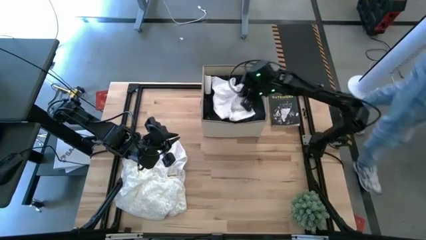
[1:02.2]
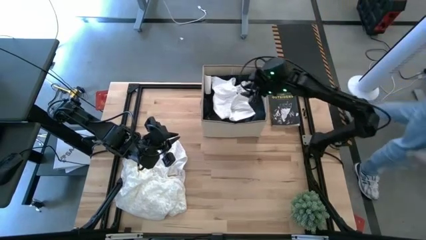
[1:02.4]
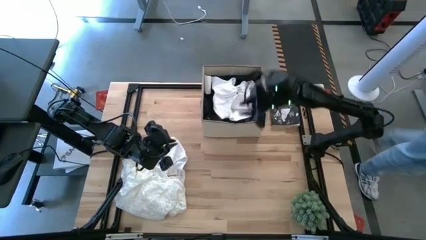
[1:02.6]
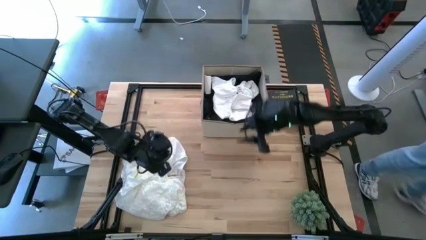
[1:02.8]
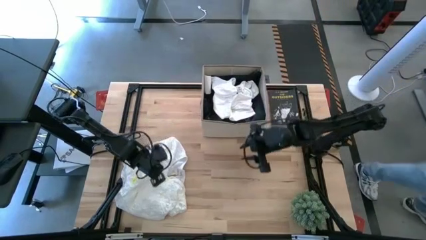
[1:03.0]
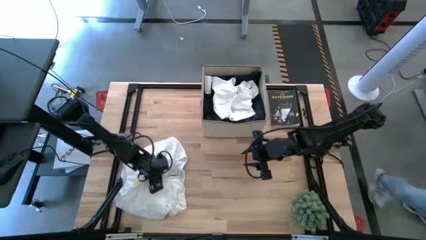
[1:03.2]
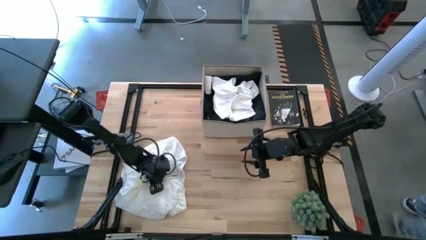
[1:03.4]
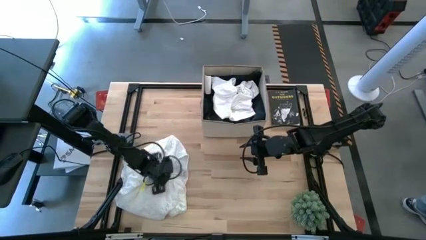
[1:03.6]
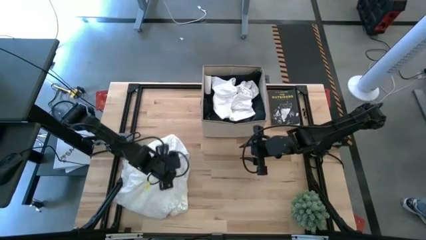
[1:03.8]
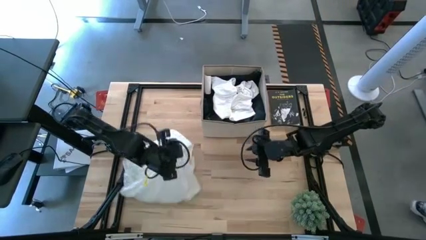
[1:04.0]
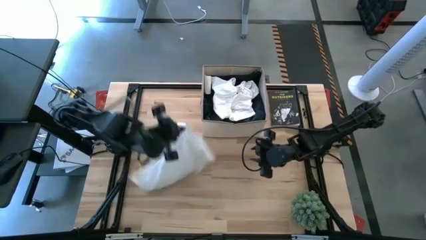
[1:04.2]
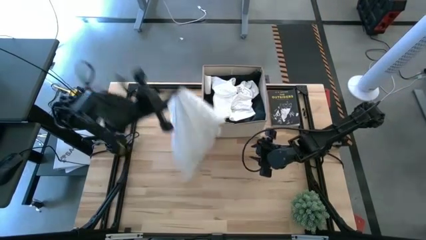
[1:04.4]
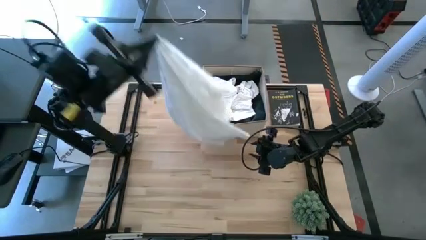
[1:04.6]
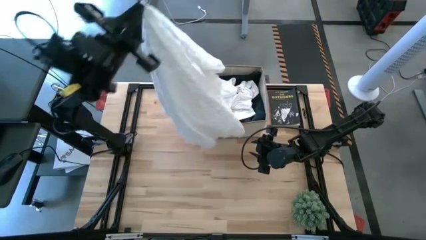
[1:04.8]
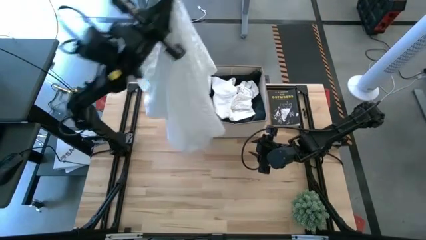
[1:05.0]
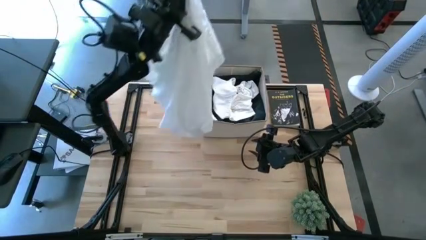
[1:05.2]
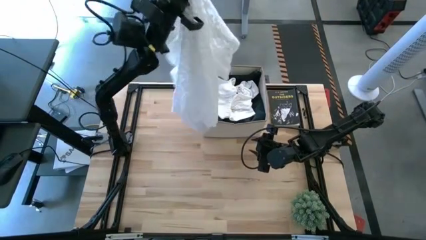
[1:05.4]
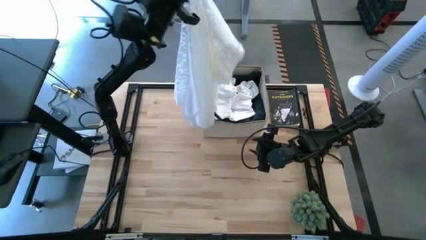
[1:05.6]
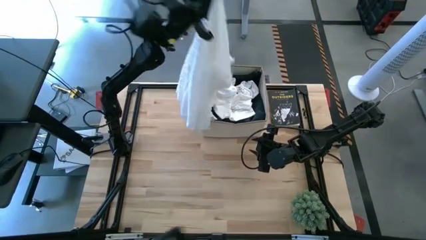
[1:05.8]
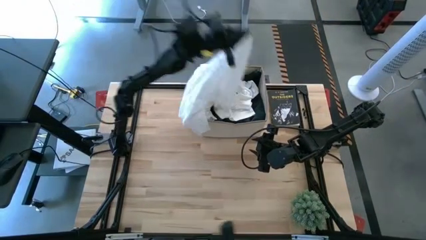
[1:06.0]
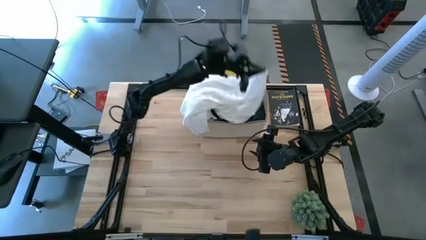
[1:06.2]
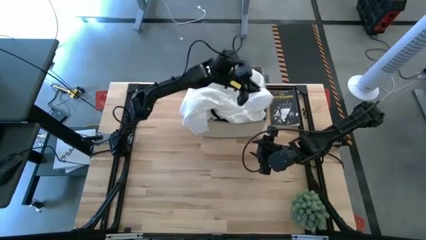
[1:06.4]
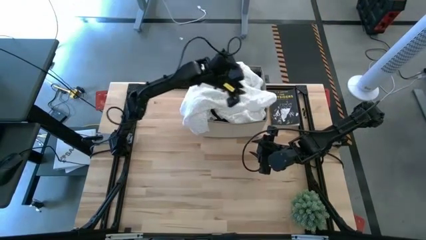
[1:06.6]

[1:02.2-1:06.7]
Task: Sort clothes
Put the white dress into the laundry organizer

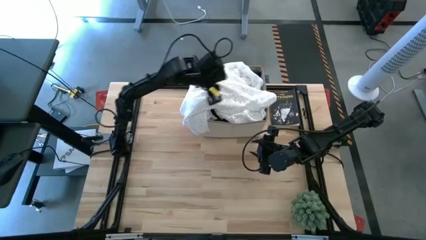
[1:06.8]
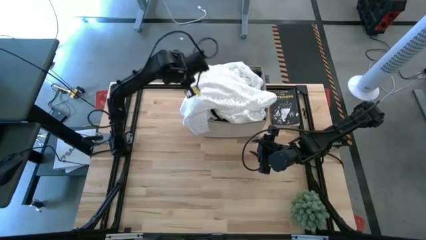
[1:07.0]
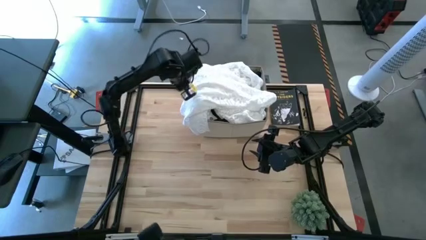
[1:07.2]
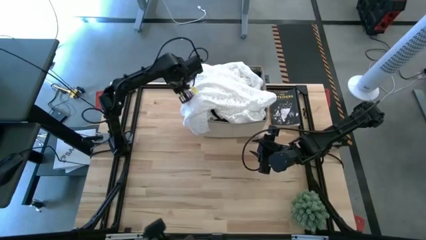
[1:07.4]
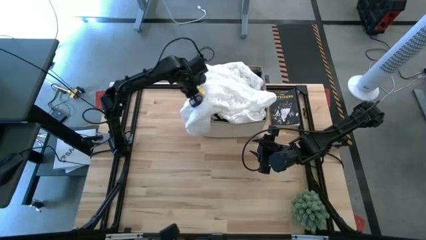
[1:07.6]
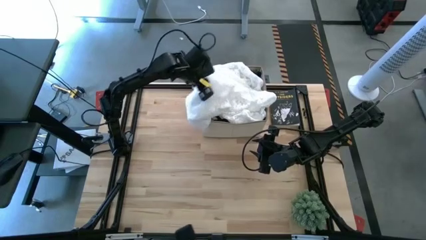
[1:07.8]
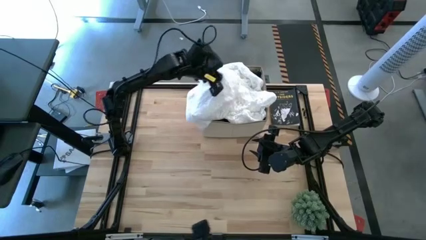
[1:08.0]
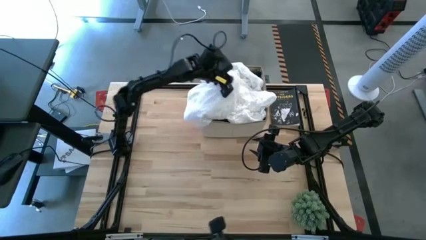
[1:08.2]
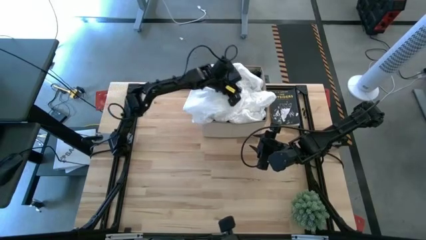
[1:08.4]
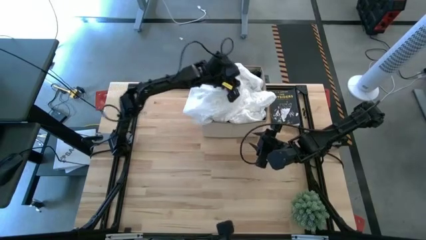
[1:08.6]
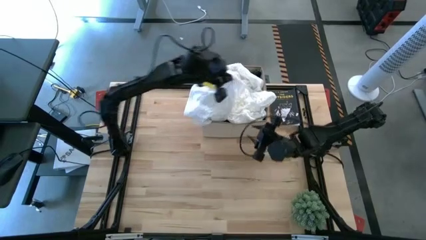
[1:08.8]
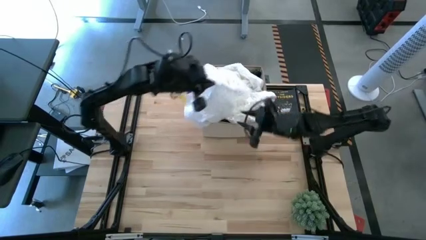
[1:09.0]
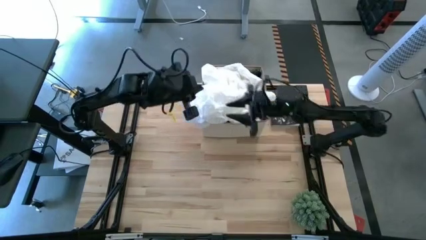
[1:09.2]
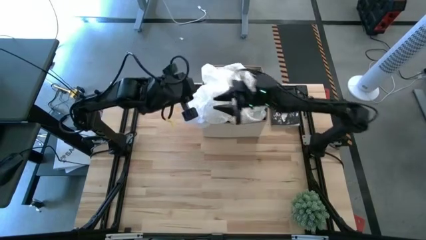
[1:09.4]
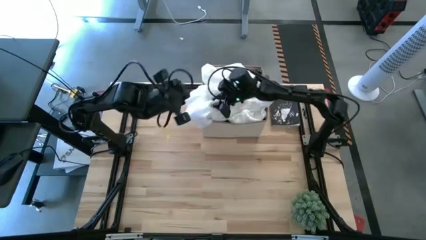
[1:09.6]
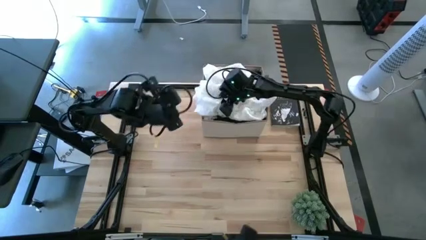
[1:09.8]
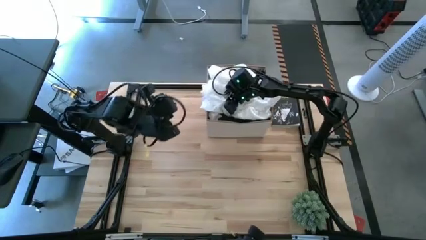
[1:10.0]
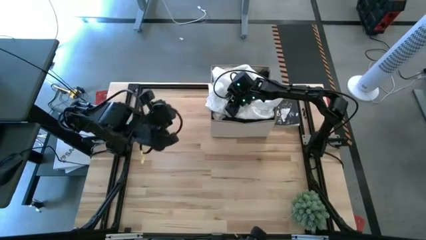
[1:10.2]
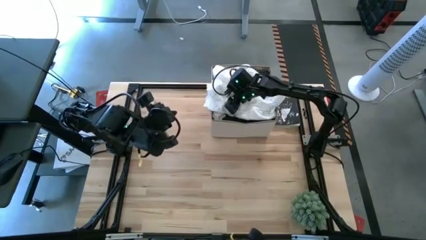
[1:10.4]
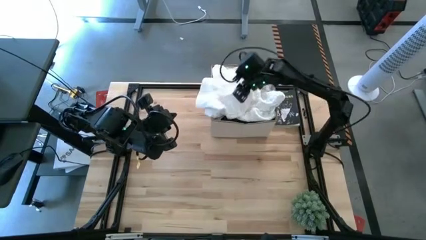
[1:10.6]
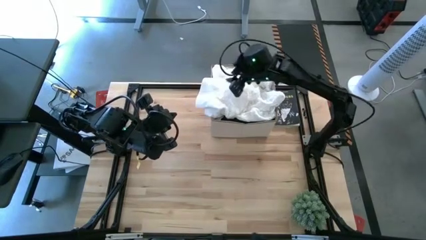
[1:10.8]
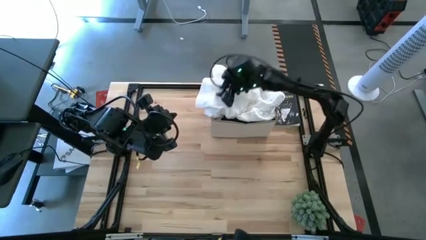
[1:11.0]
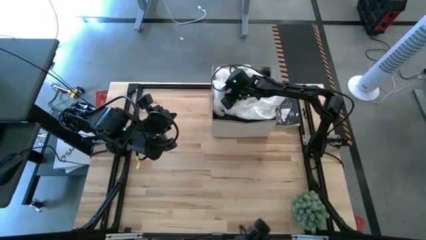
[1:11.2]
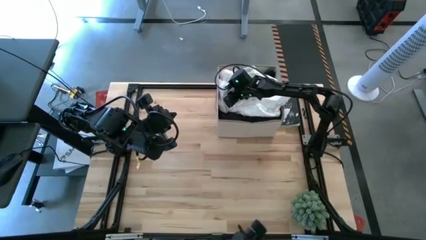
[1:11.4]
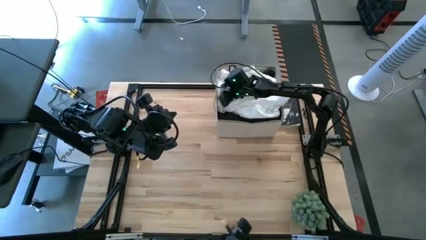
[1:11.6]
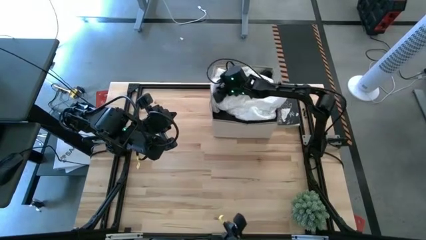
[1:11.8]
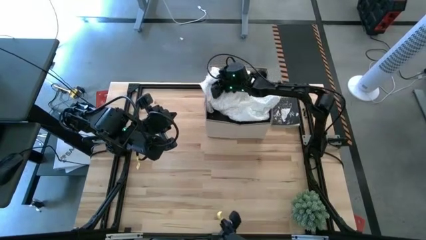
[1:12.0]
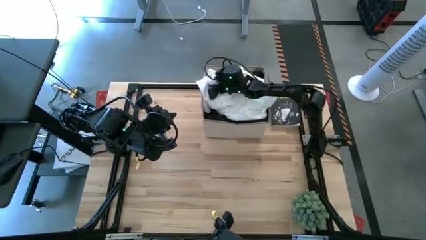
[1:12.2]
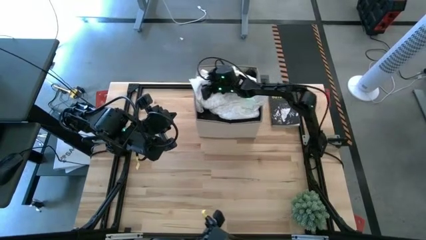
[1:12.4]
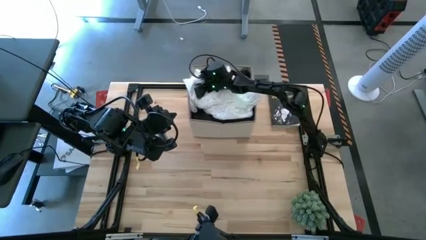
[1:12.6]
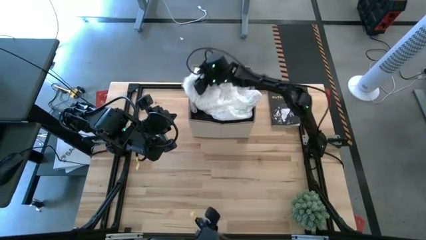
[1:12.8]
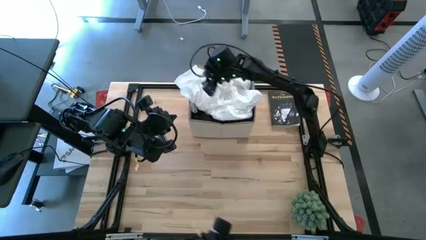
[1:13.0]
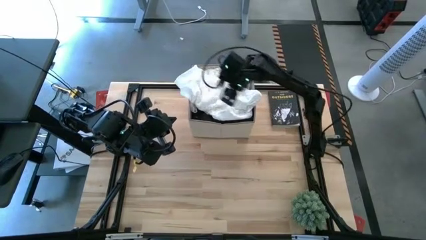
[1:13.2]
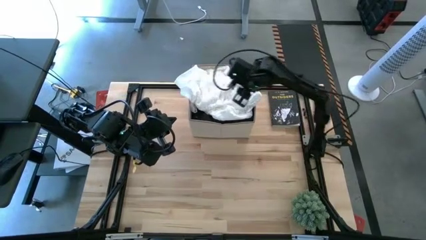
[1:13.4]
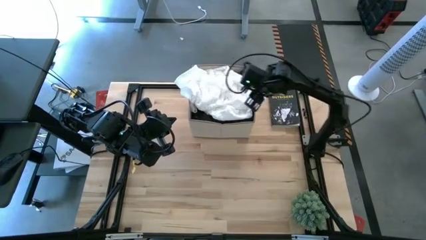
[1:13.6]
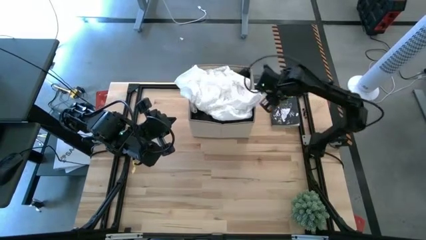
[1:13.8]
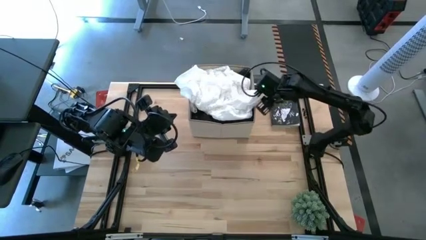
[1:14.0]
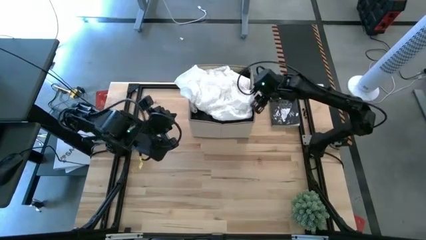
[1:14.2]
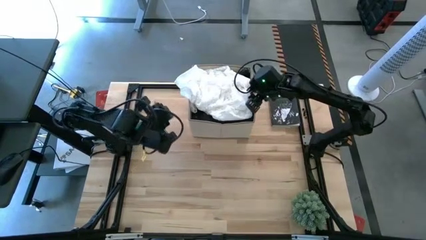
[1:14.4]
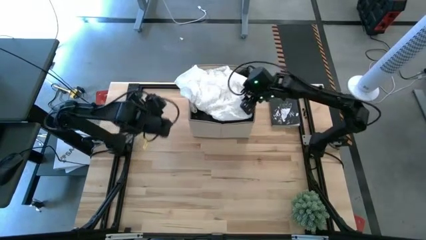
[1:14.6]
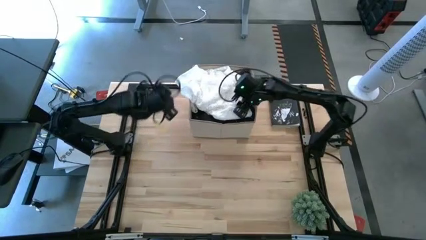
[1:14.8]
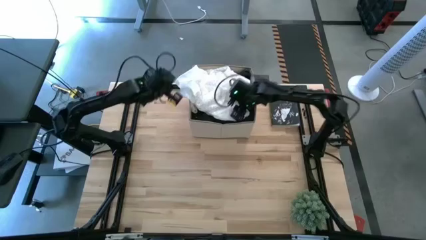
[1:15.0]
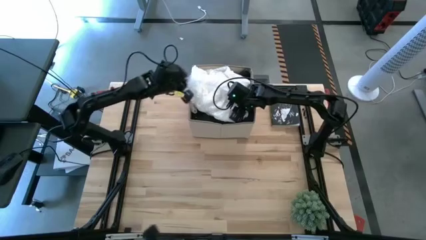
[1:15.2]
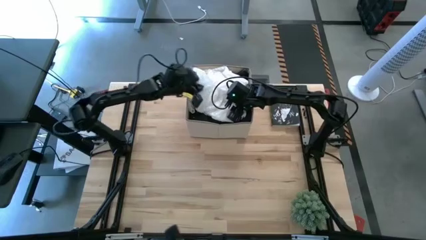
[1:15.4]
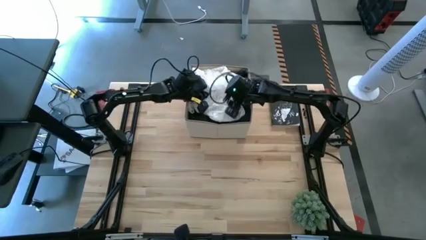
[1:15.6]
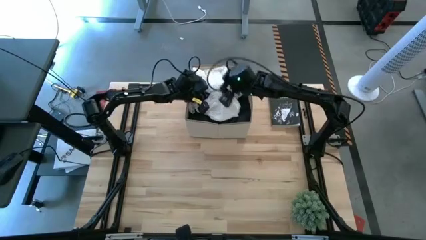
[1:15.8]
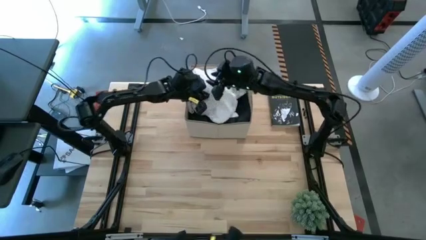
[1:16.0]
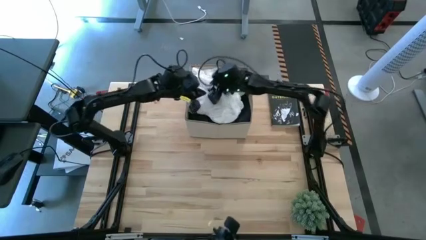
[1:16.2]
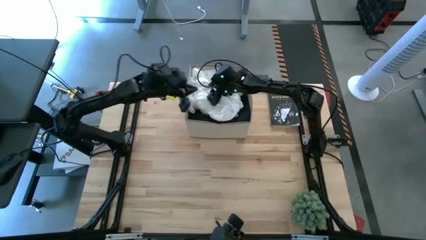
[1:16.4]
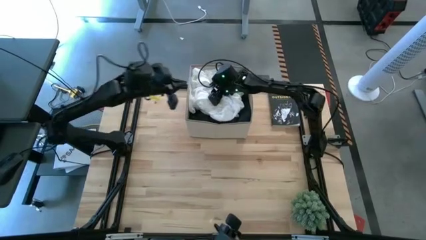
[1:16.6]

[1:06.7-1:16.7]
Adjust the white dress in the laundry organizer

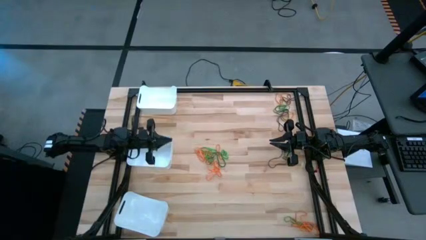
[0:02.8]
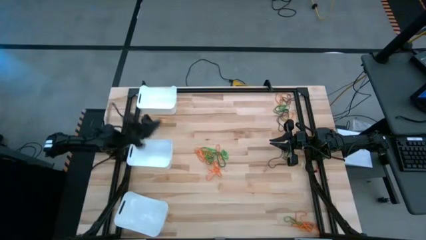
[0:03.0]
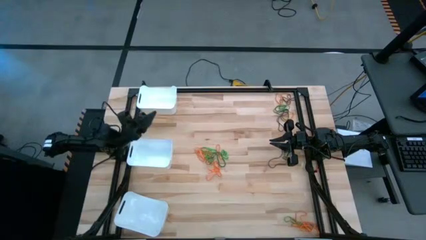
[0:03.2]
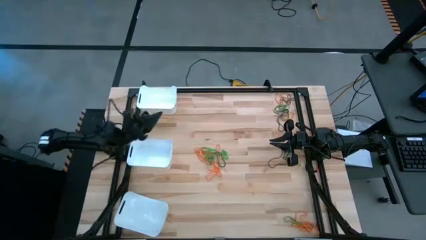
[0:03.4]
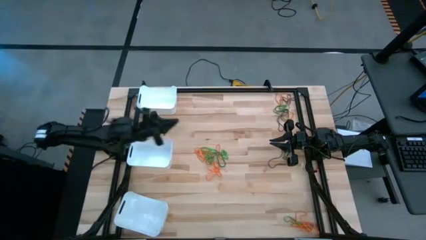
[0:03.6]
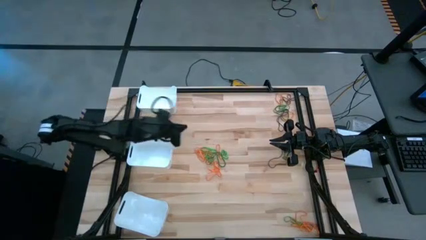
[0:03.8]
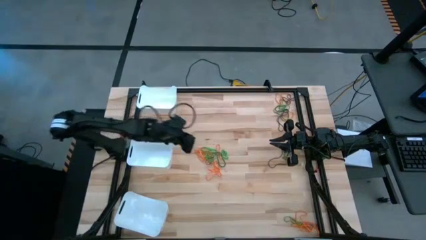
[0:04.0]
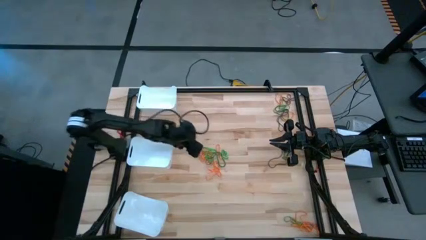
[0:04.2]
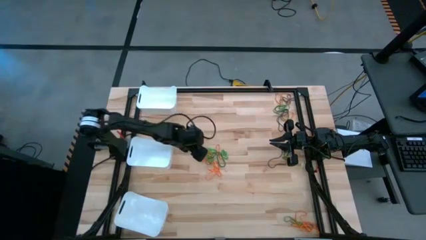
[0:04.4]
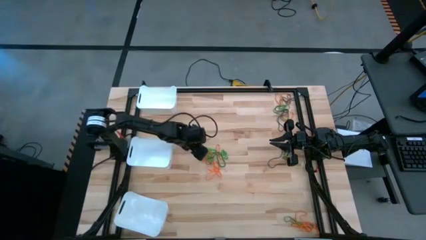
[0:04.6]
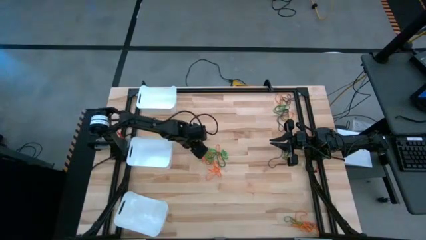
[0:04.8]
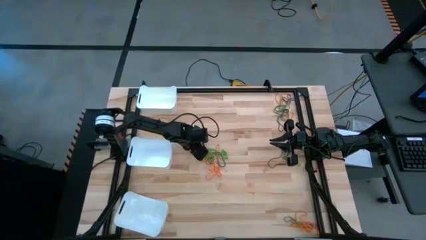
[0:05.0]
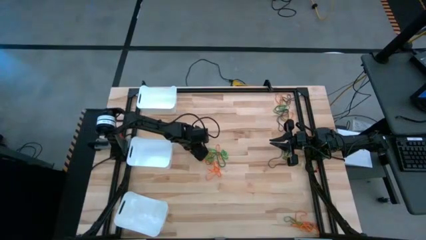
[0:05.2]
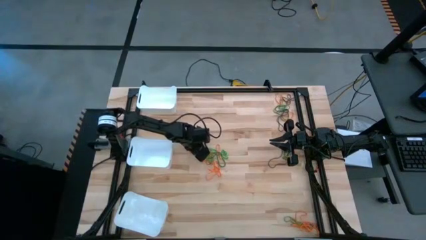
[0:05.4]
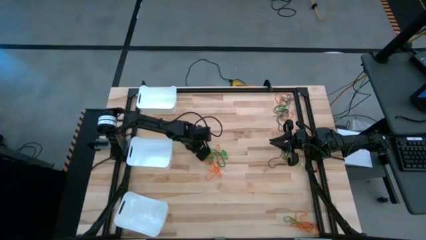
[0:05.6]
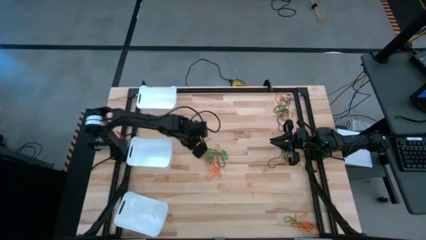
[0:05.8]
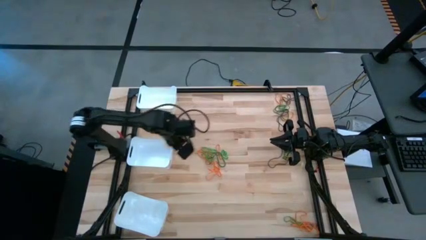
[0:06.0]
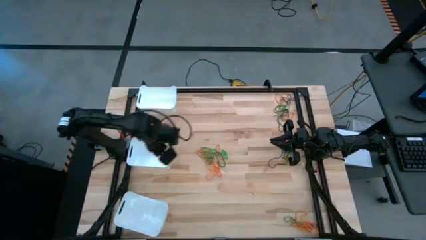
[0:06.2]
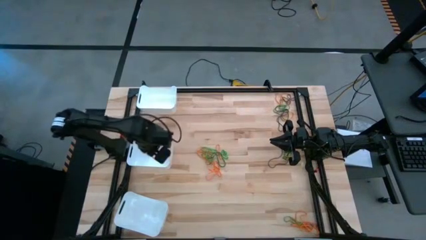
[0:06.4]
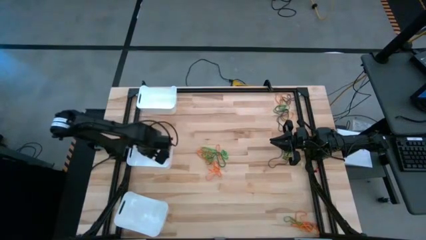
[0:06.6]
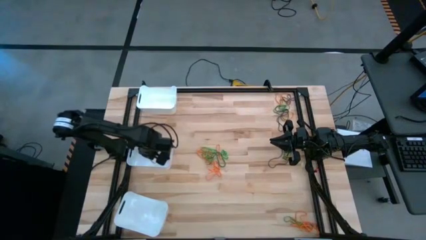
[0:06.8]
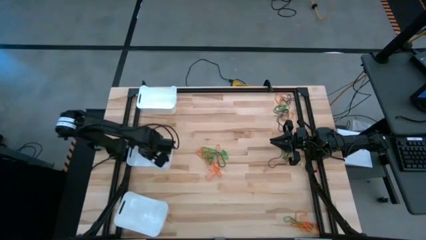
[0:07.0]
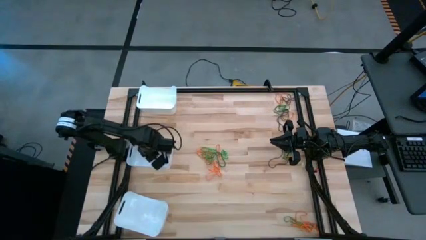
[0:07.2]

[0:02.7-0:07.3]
Task: Sort rubber bands into baskets
Put the orange rubber band into the middle white bin
